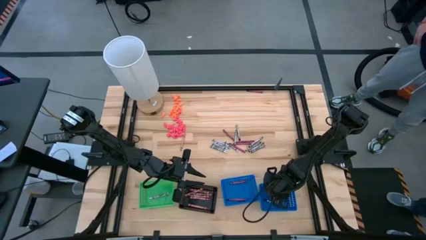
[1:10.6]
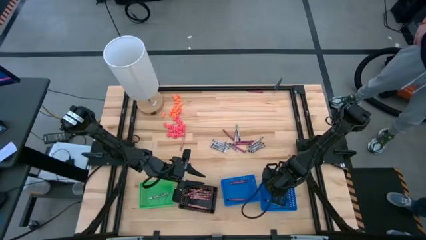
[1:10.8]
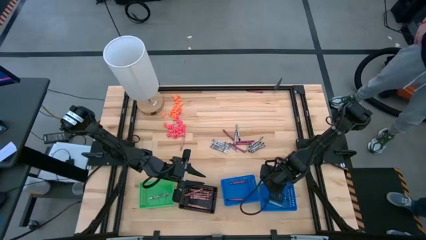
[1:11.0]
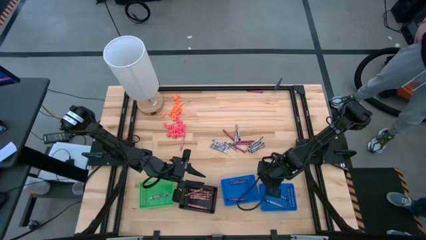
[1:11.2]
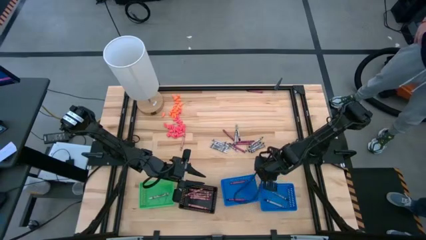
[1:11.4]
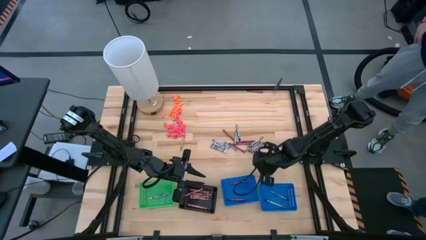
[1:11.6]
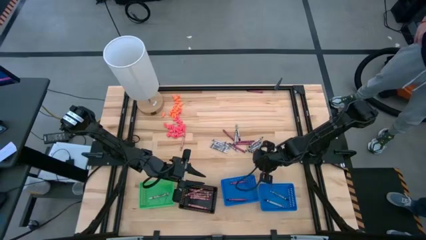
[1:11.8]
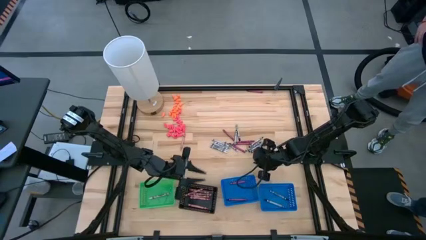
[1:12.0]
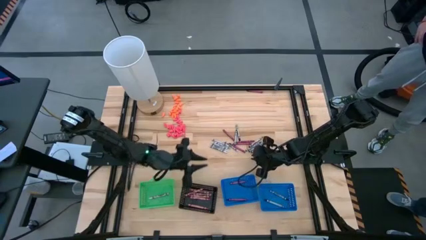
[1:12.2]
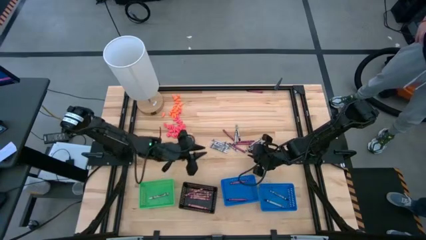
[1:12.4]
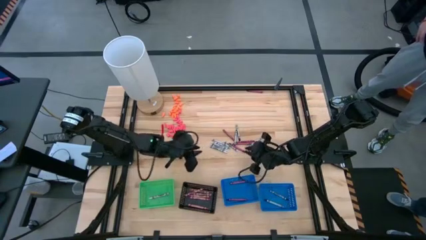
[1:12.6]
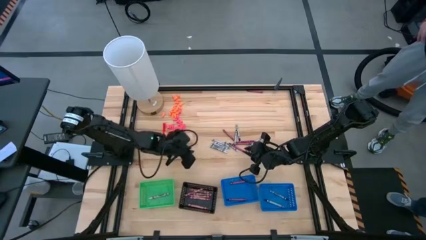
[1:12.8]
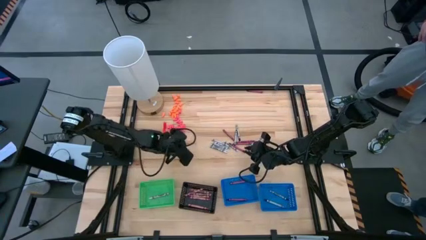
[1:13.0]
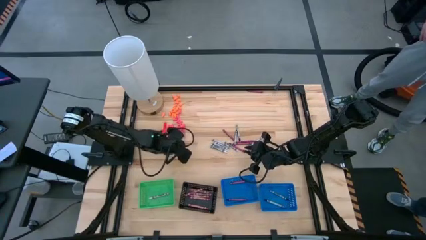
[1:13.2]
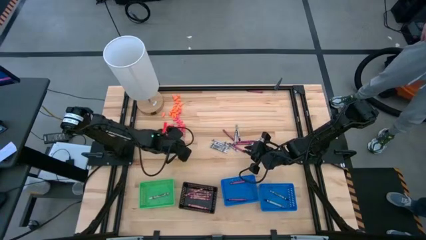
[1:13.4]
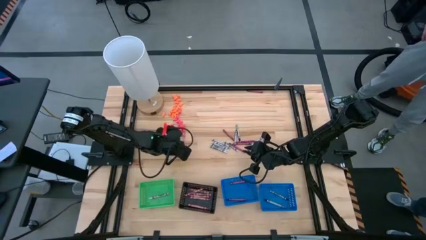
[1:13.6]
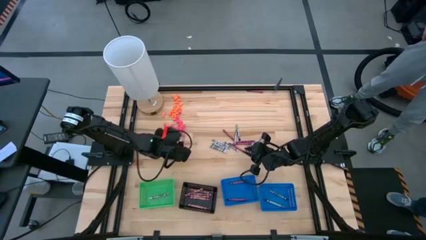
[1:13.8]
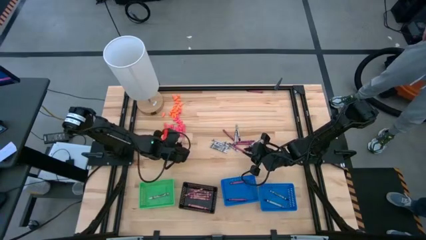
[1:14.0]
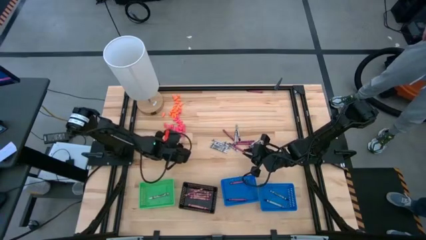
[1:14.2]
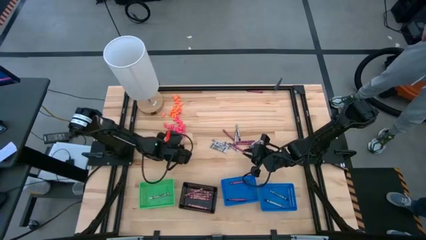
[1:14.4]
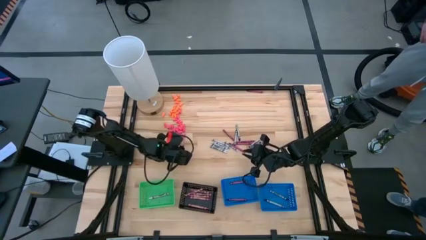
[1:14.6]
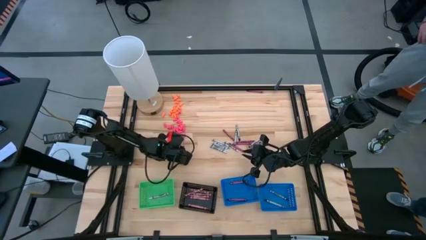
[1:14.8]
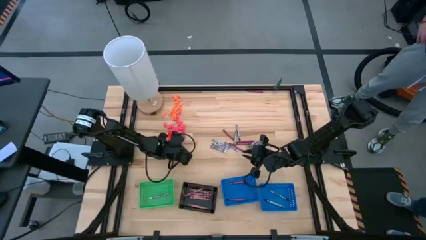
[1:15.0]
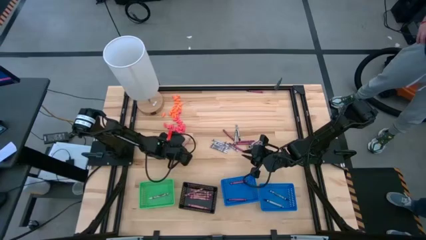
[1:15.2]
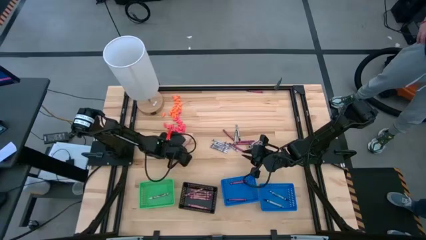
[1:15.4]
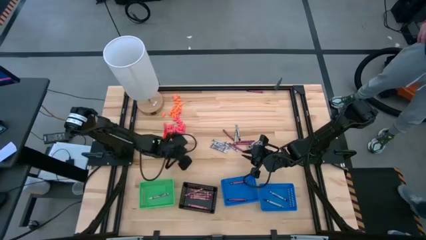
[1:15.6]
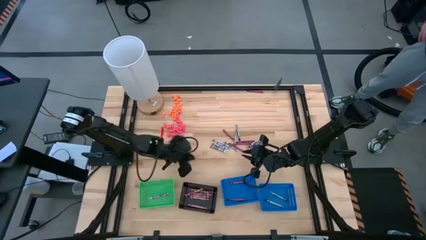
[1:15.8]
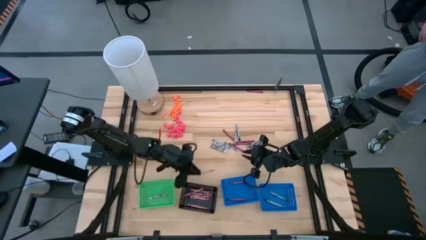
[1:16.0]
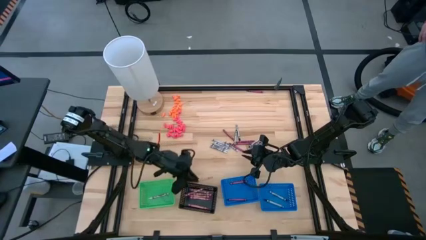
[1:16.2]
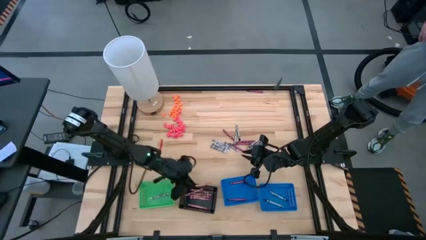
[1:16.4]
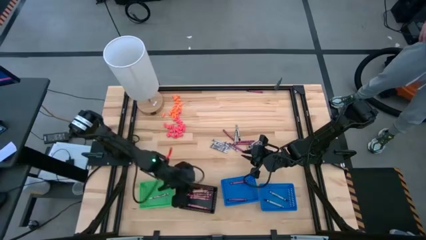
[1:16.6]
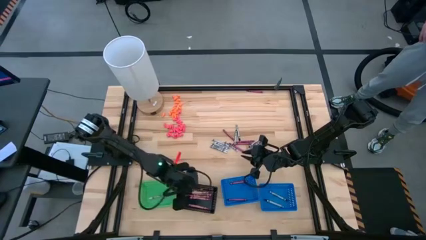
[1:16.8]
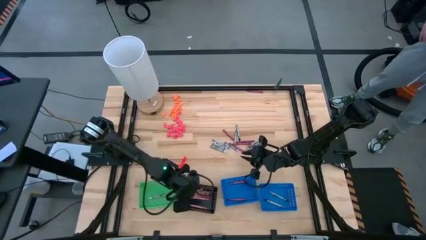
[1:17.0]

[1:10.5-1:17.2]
Task: Sort crayons
Put the pink crayon into the black bin

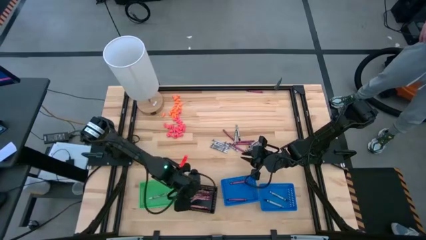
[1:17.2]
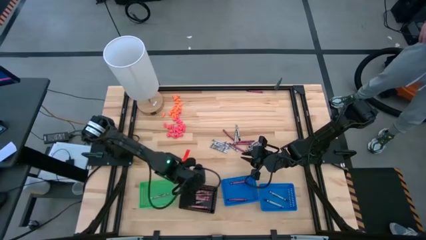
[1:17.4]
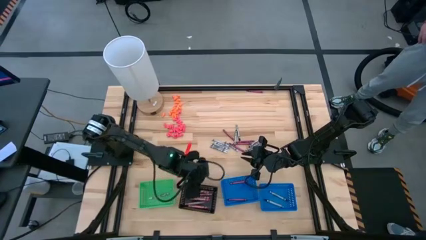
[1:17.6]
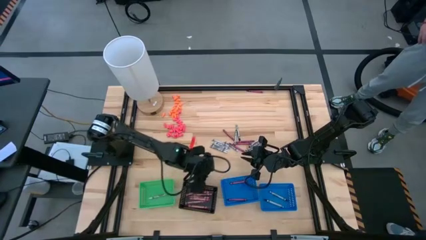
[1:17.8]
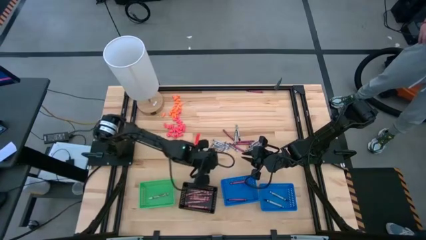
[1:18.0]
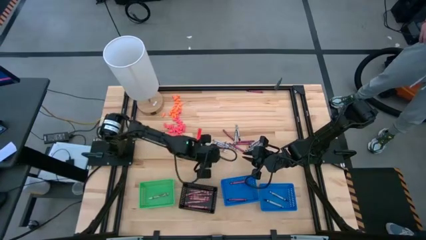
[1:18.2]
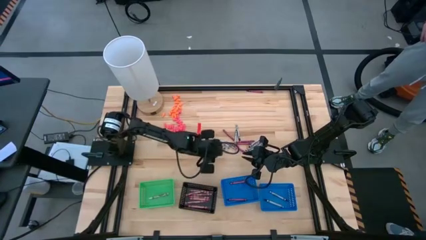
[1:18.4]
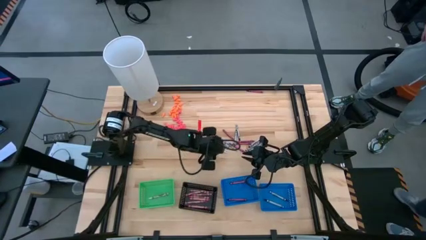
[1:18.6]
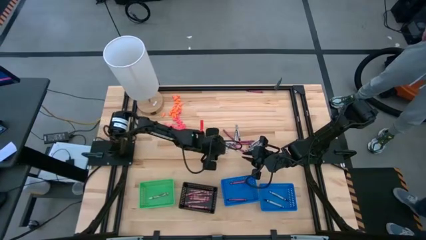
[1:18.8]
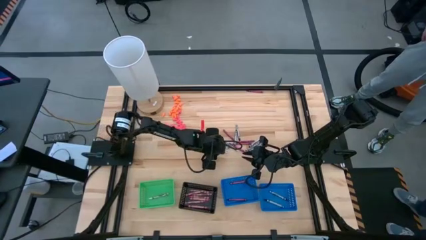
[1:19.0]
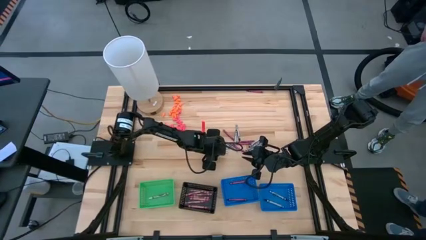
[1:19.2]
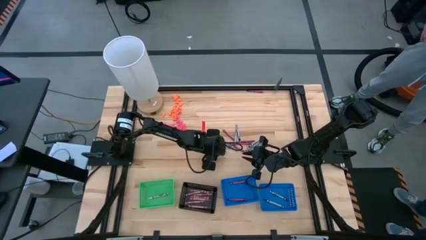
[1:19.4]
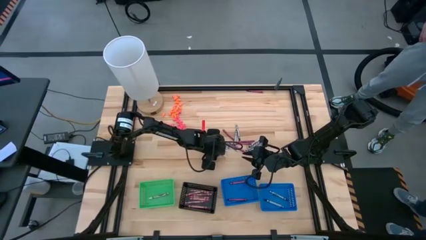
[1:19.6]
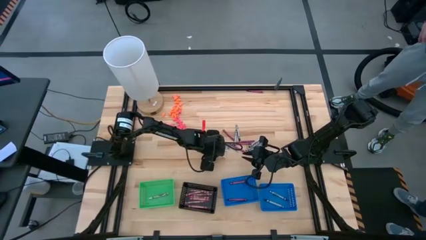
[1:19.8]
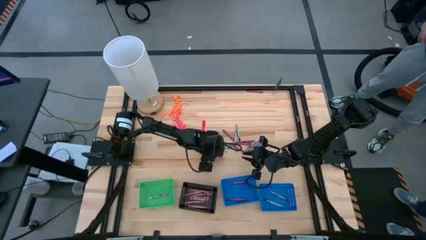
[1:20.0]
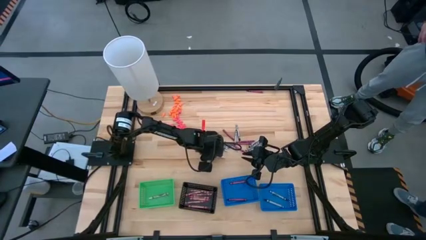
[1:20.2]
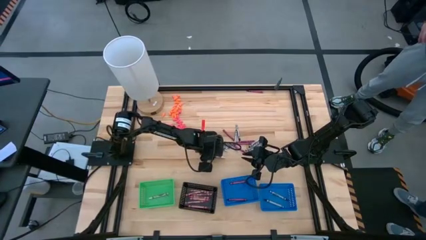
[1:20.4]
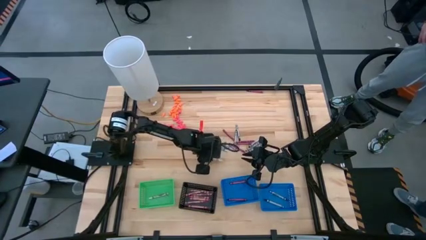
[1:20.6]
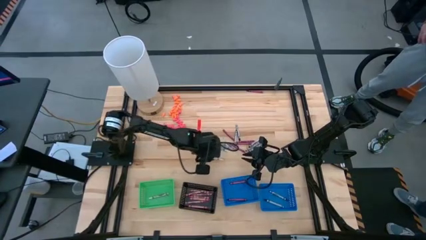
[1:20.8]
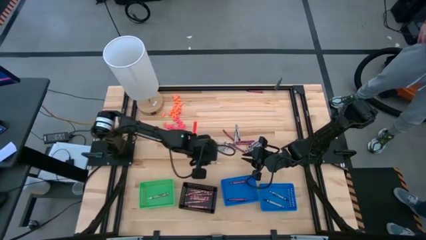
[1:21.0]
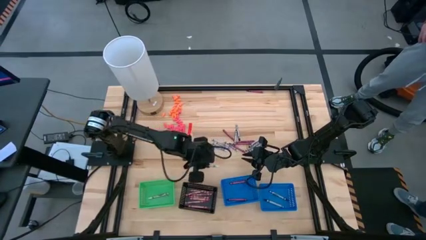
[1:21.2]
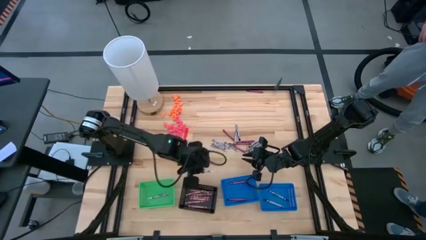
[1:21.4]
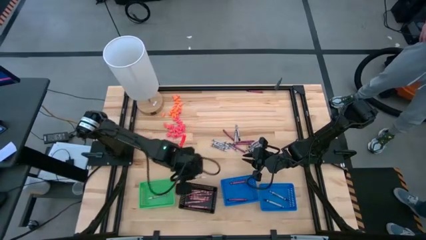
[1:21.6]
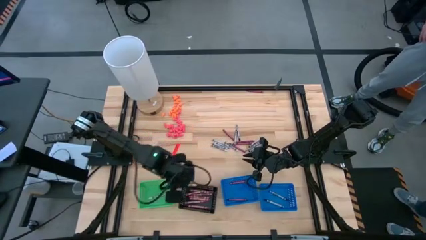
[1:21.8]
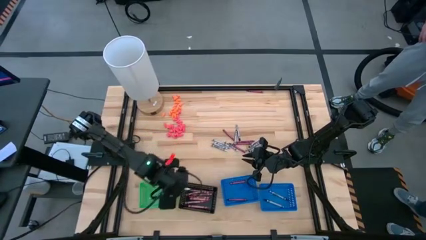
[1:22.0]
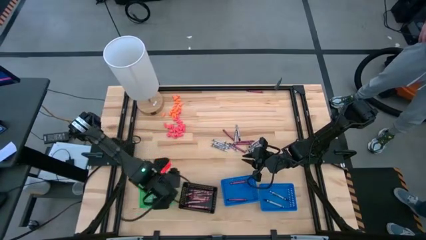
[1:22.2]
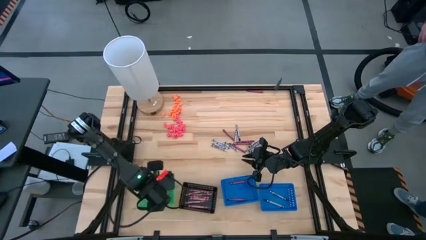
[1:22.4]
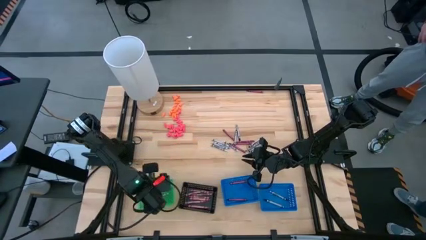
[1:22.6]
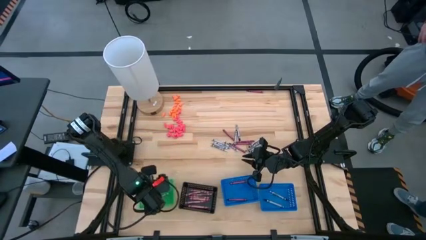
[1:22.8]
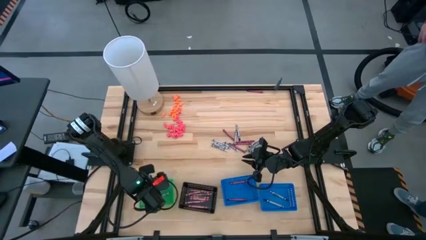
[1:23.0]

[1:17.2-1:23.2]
Put the white crayon into the green bin

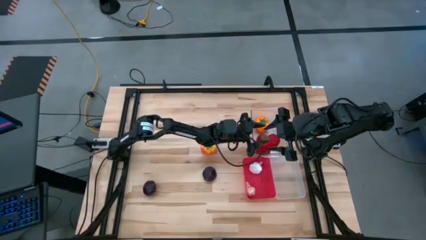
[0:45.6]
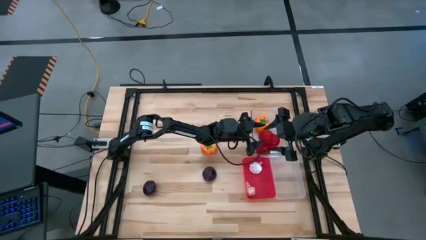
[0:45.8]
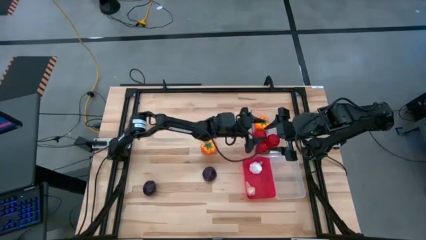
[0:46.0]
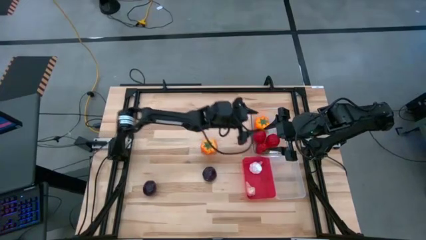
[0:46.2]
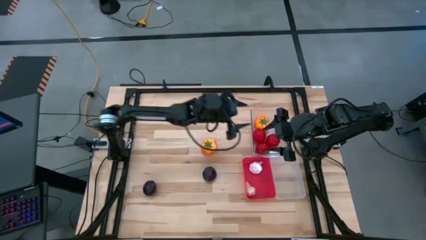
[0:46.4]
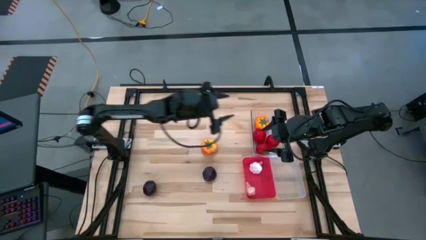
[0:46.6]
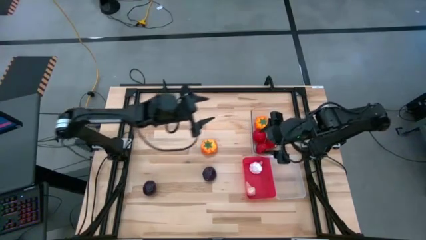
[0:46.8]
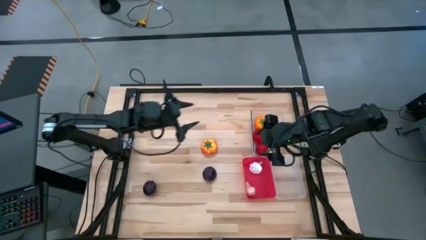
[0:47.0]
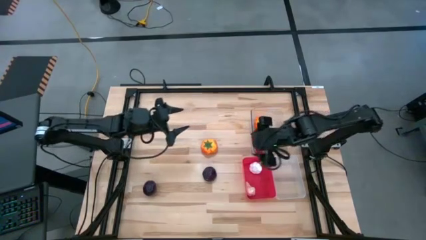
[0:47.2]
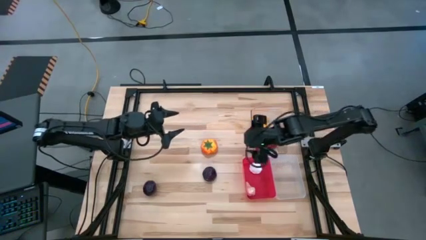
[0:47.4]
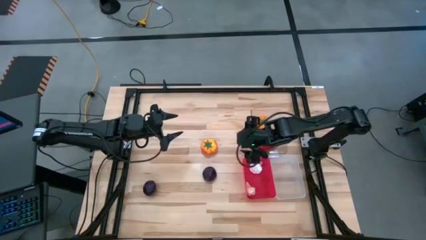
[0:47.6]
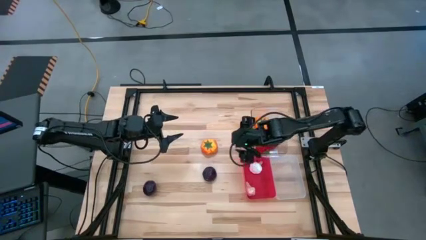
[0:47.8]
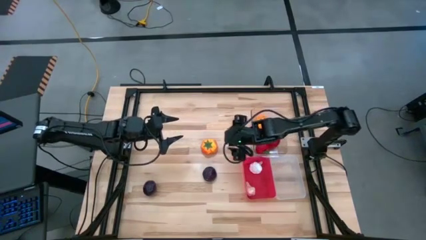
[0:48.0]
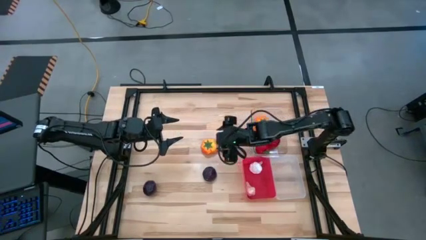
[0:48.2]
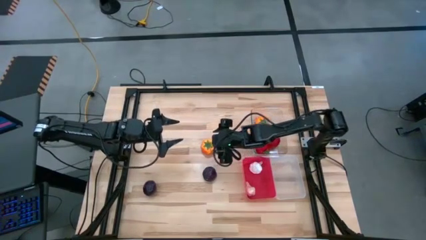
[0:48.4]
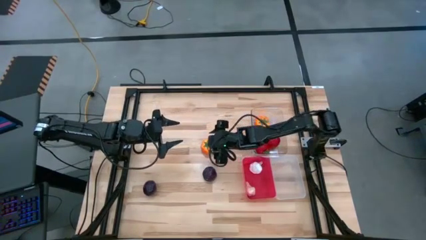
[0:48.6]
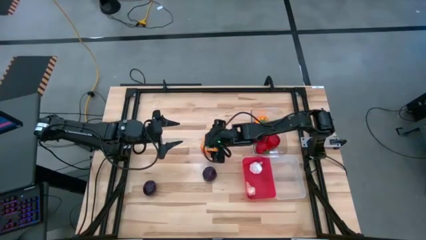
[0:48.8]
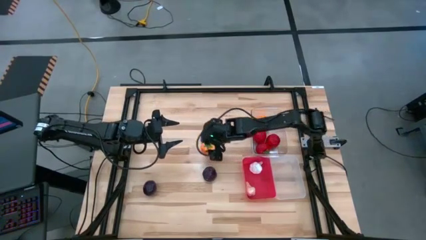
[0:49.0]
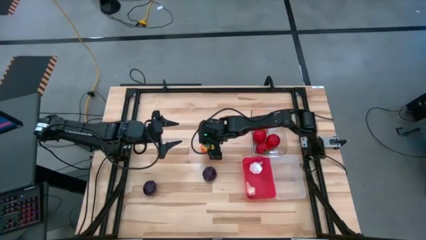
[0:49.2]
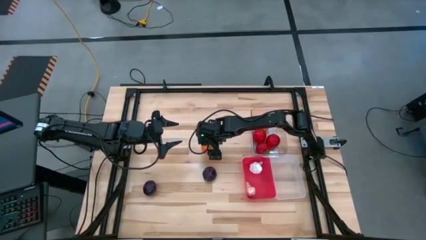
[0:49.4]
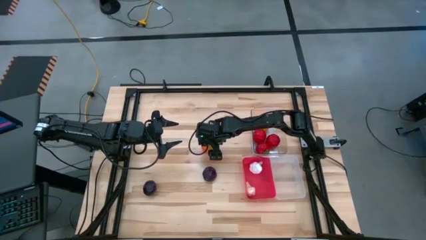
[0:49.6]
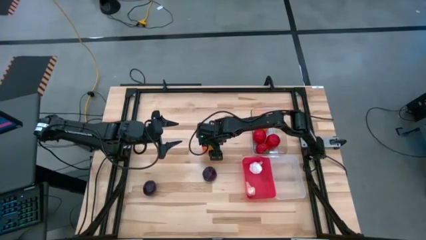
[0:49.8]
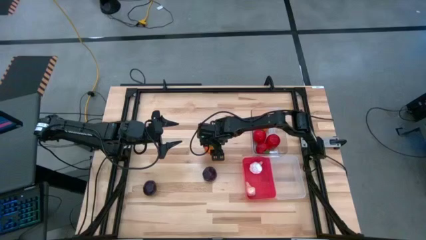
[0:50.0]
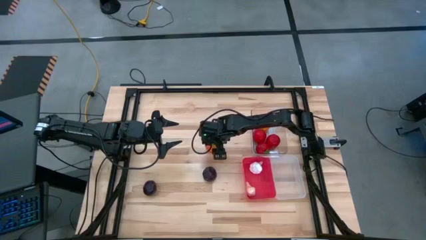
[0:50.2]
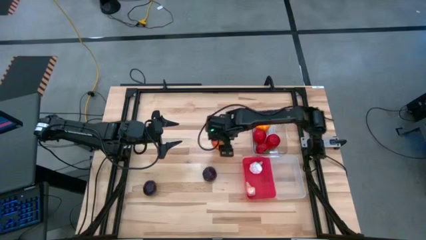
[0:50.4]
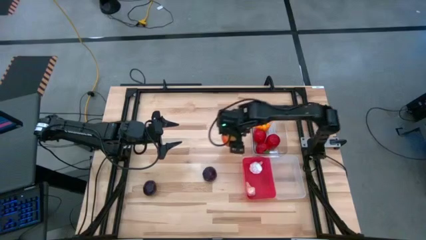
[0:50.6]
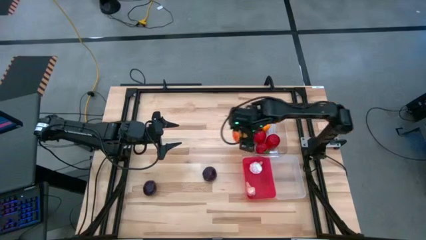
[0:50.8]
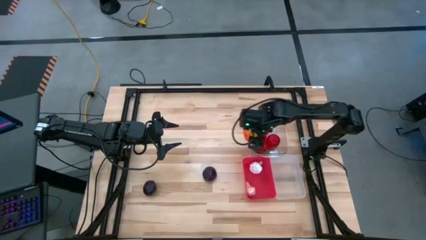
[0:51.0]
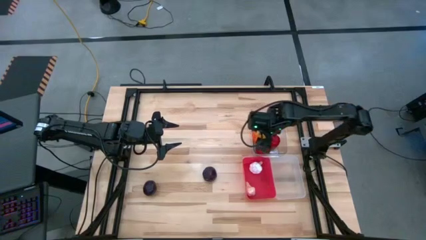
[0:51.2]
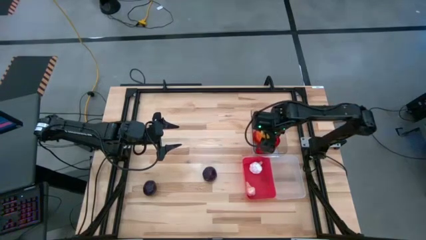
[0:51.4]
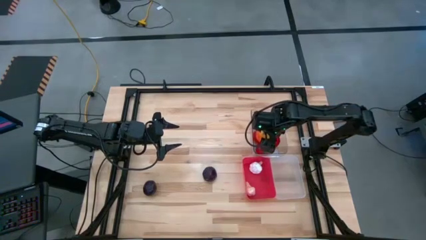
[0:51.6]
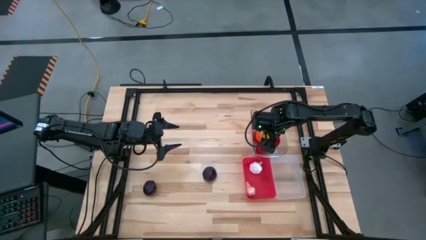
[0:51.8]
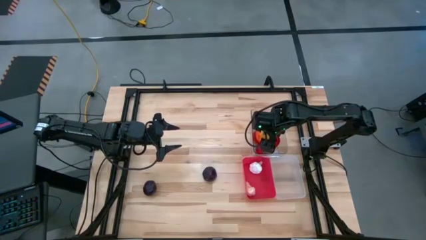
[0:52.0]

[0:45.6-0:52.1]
Task: Sort produce into baskets
Put the yellow tomato into the top transparent bin
